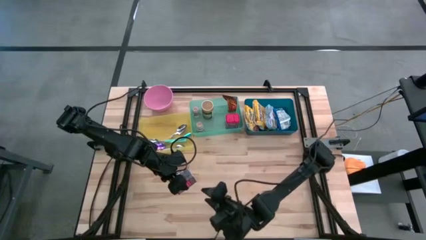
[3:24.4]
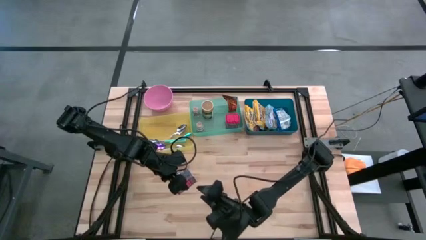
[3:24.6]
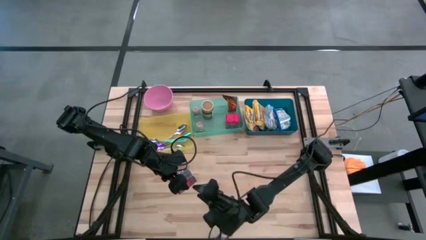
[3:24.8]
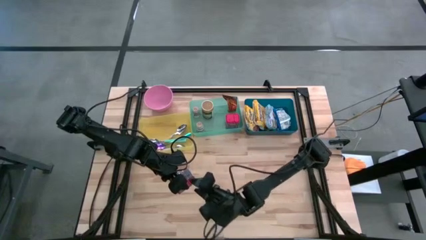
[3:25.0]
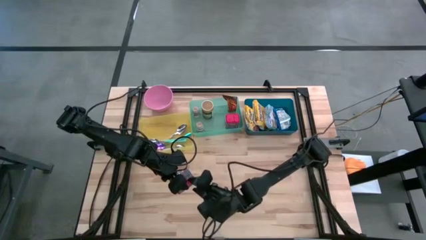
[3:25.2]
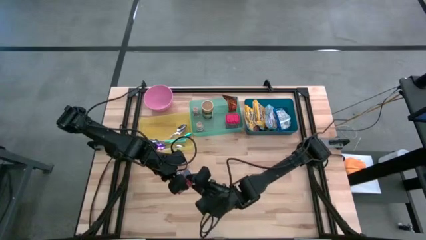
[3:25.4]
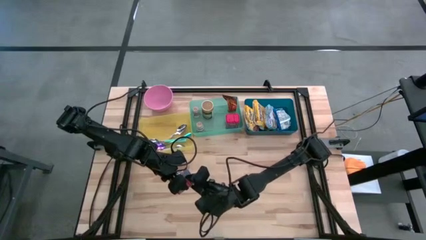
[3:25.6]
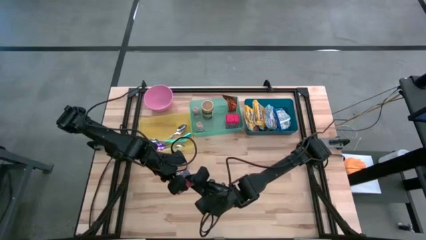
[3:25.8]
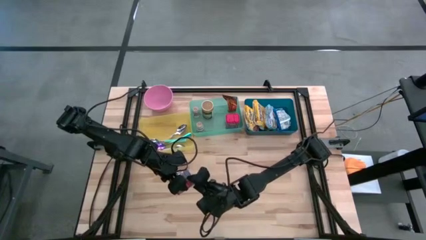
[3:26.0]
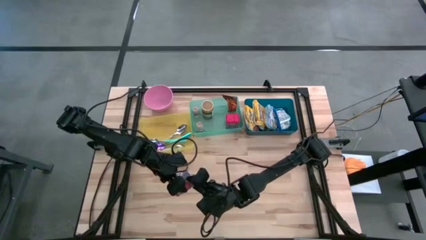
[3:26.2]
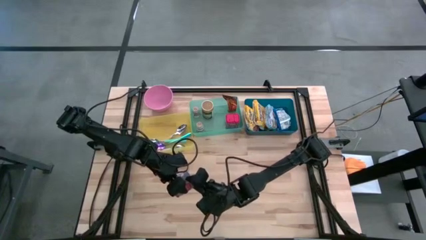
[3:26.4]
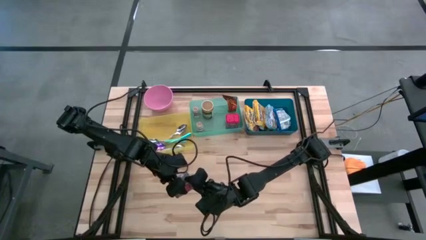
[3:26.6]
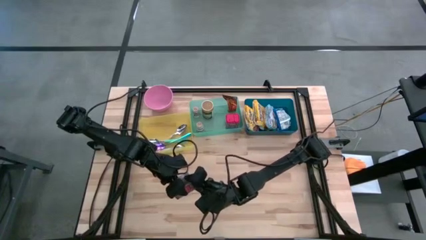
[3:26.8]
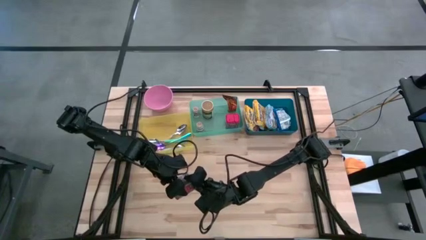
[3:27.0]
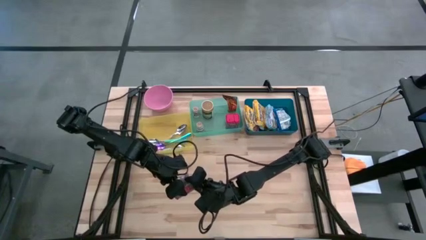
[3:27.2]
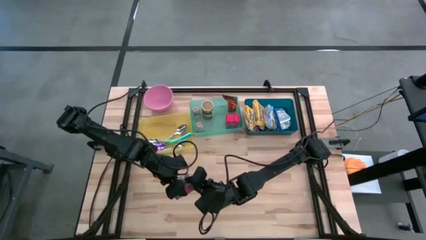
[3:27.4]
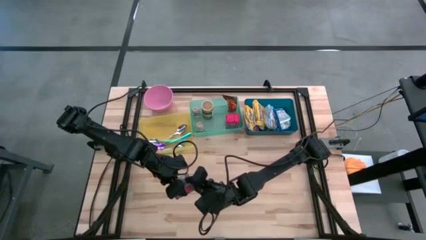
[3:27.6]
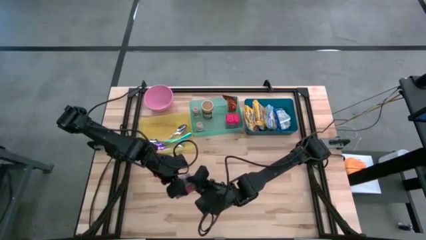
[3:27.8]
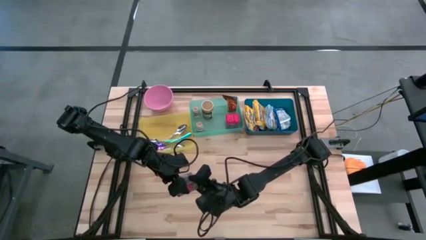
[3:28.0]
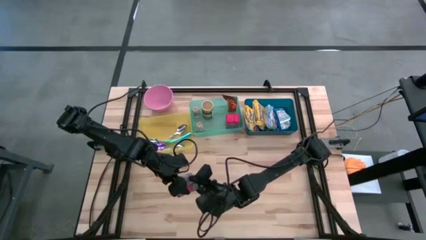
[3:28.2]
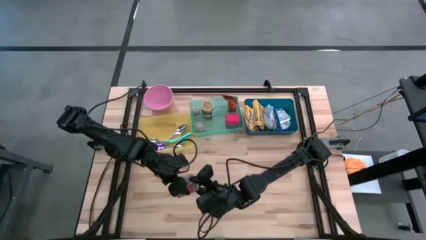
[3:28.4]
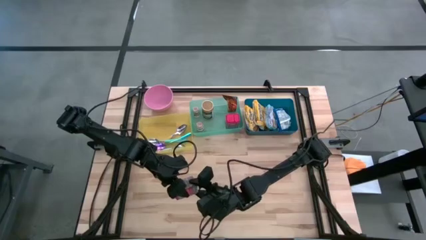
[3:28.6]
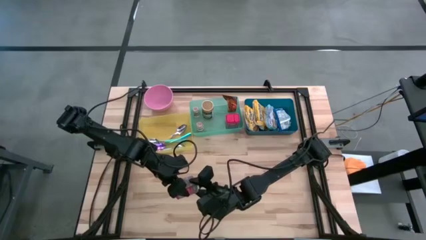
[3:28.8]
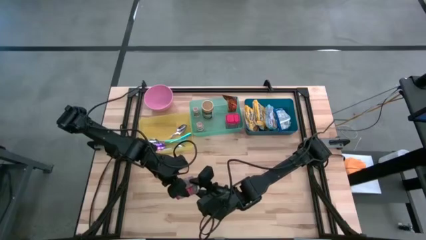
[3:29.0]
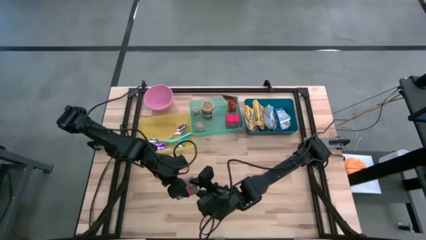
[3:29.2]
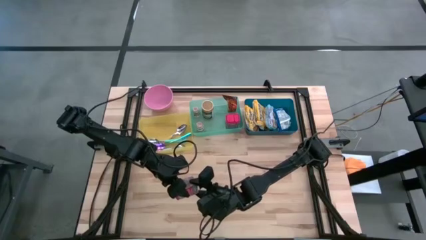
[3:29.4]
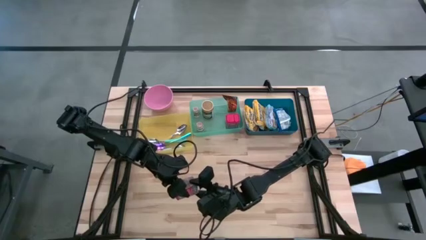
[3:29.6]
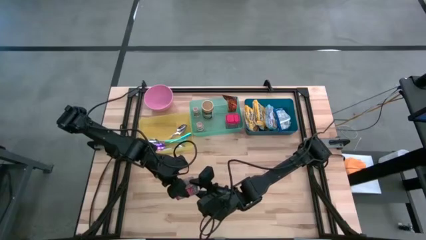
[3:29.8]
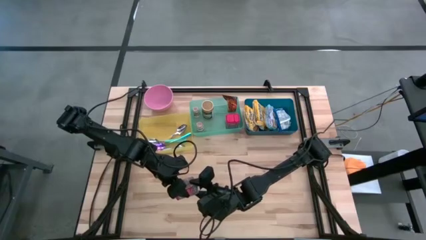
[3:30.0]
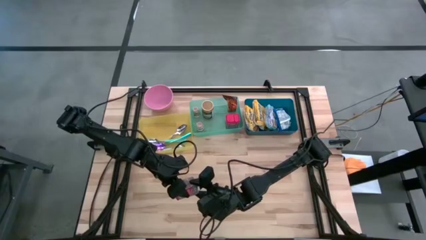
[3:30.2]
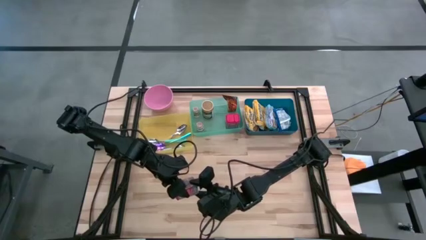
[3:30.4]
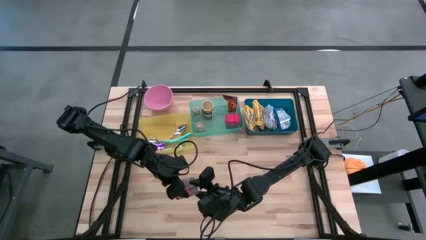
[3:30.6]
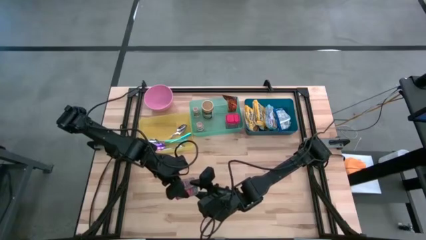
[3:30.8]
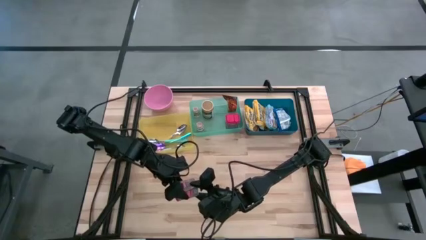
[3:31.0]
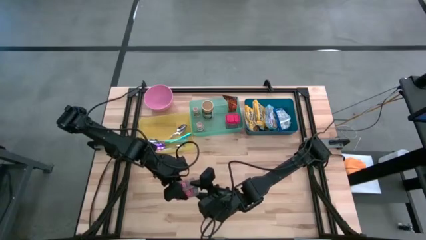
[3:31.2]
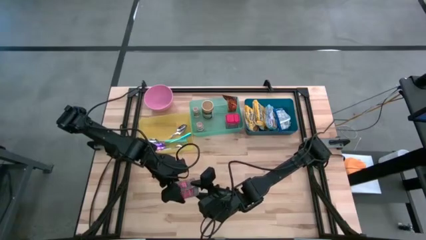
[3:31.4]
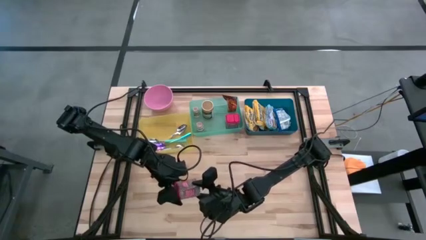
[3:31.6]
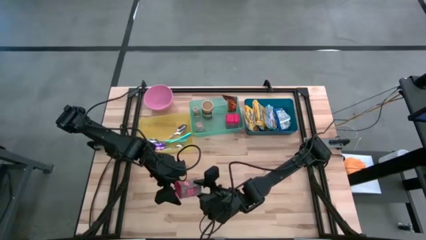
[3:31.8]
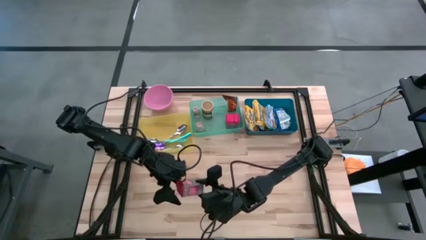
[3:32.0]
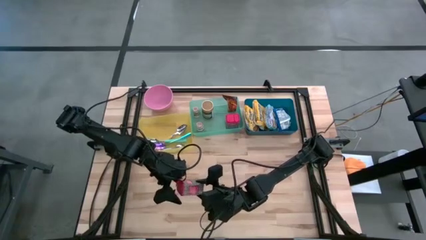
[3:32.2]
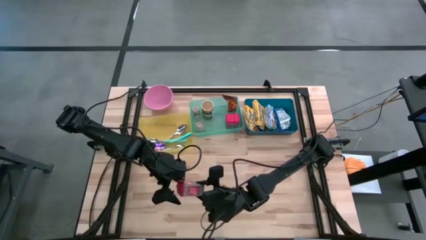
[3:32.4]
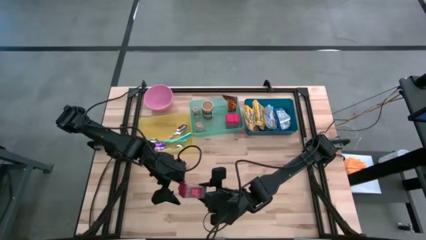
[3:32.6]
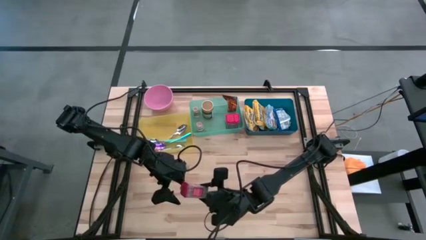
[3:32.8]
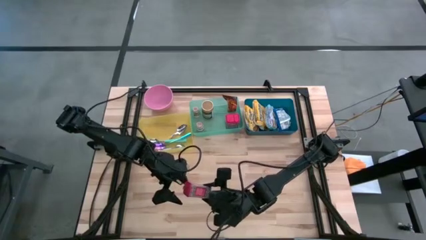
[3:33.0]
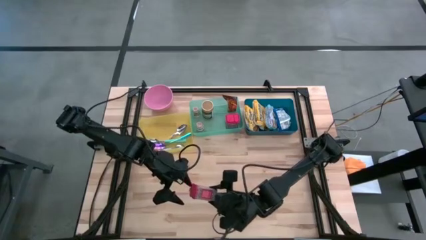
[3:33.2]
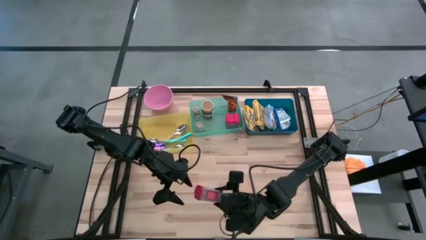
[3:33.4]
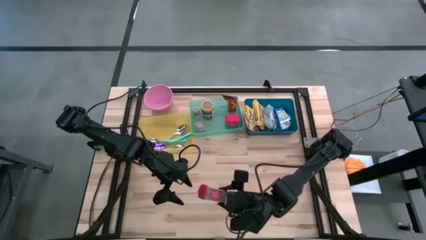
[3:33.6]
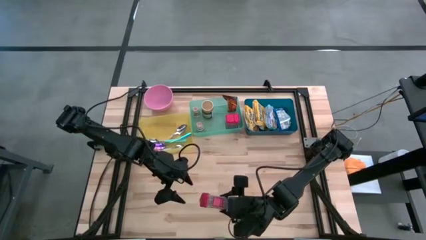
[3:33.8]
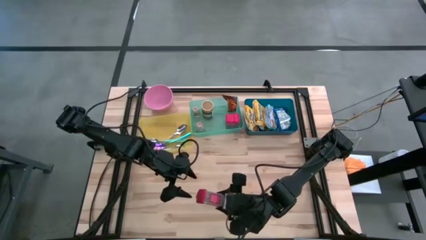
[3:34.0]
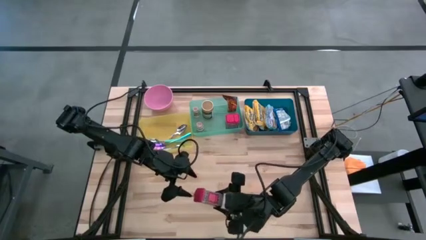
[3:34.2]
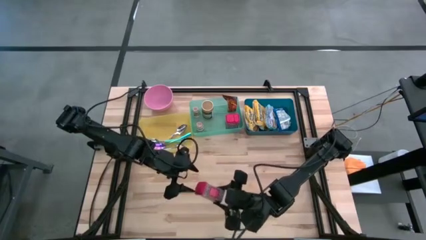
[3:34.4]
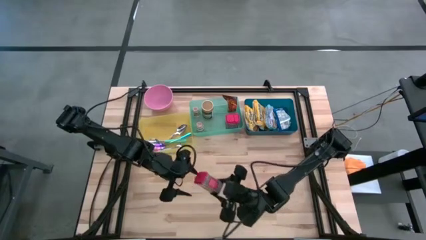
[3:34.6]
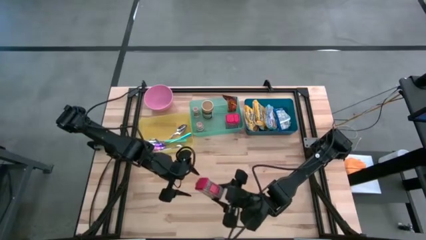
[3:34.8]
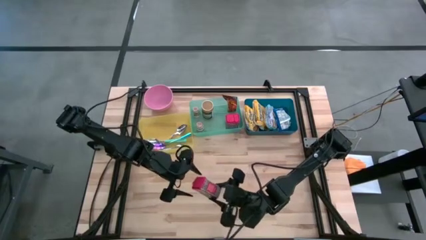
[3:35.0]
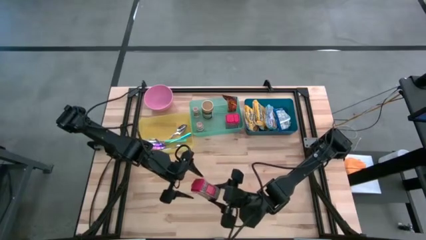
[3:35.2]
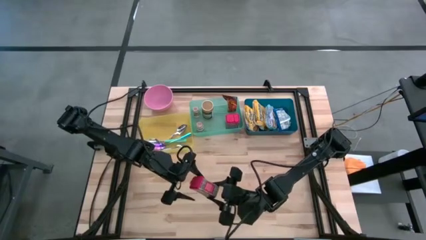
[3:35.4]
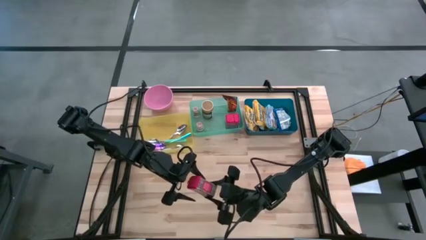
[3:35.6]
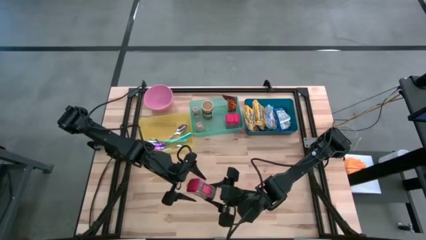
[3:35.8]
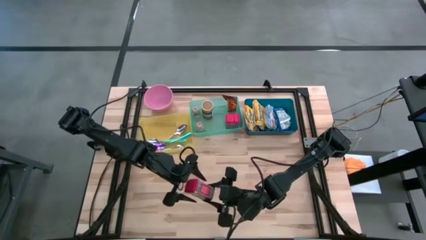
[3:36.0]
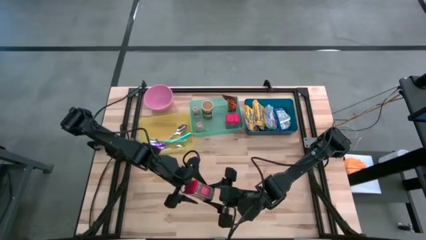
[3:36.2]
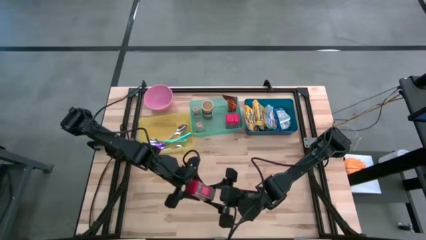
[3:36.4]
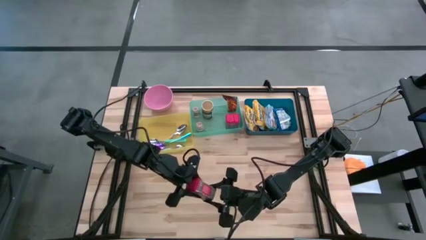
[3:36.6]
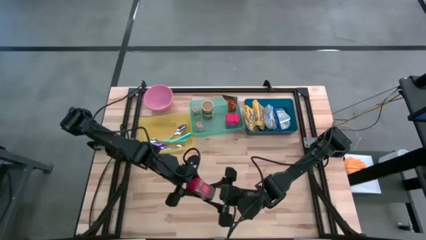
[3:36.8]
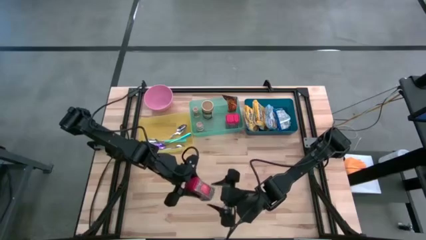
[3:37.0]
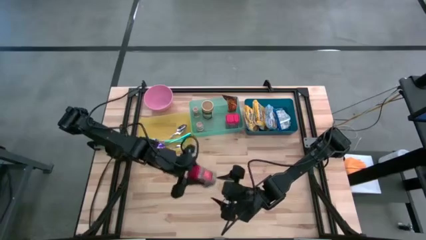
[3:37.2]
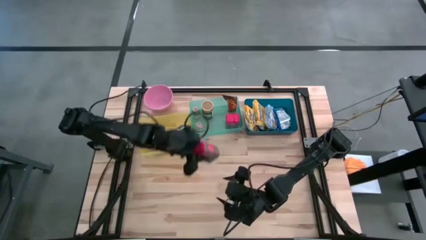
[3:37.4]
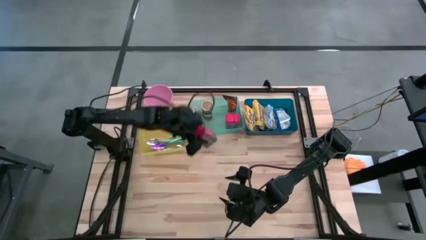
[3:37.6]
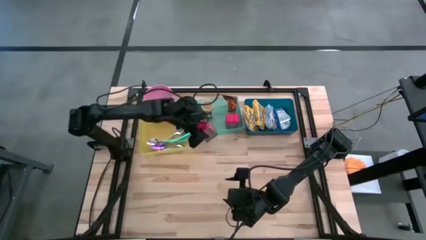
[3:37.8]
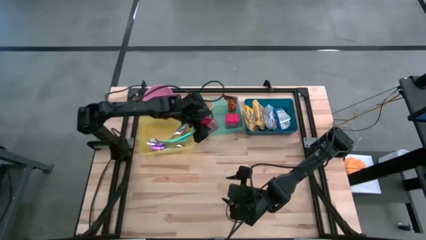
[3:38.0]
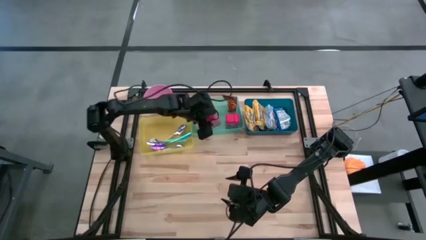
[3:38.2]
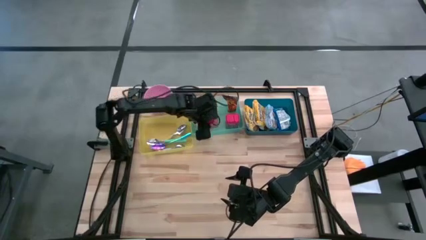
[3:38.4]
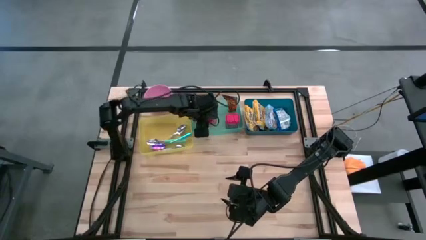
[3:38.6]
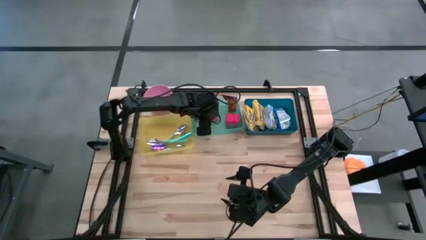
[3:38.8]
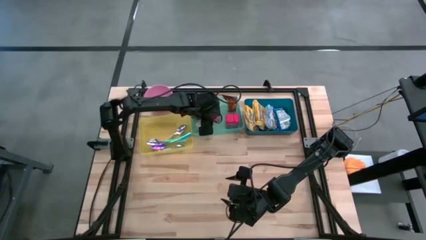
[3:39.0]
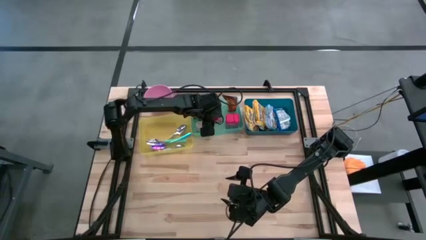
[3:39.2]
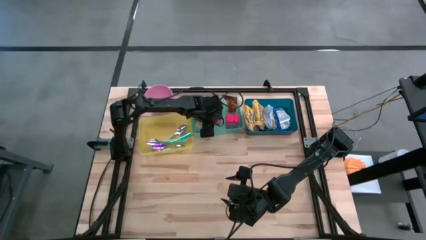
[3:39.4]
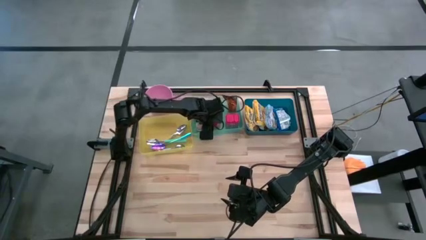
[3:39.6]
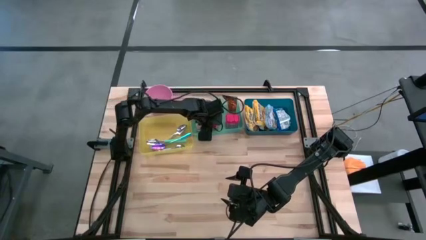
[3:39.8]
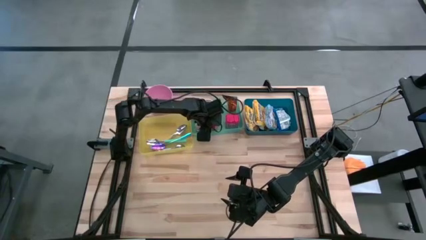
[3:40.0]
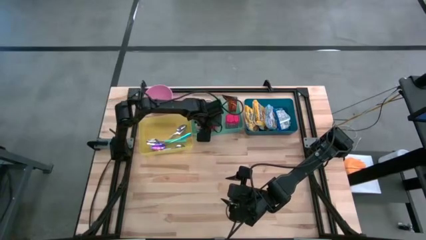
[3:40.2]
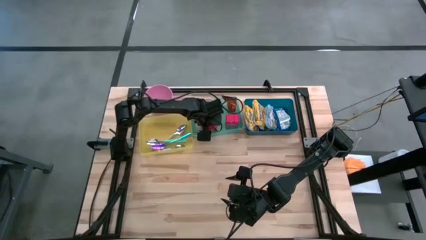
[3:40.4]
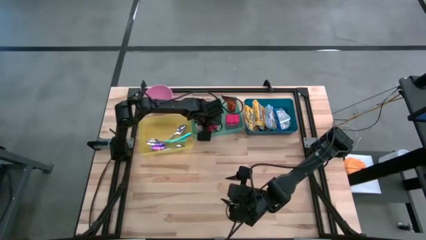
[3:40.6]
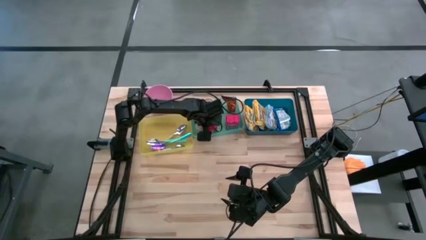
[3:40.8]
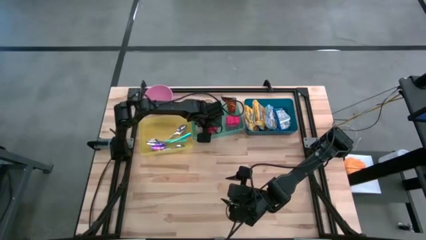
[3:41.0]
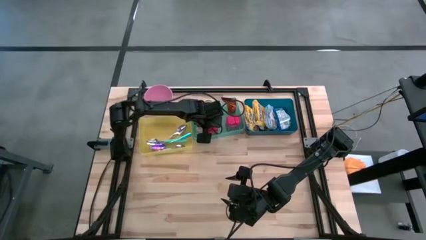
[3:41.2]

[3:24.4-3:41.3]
Put the red seasoning can into the green bin
